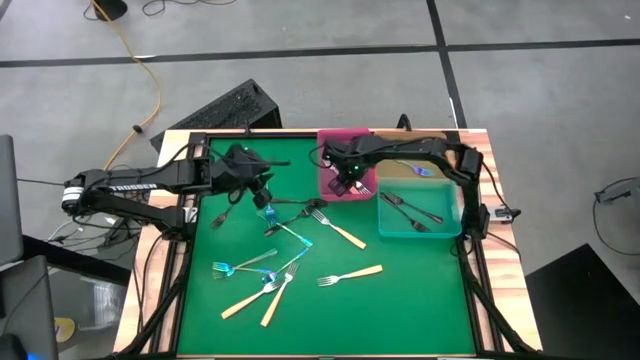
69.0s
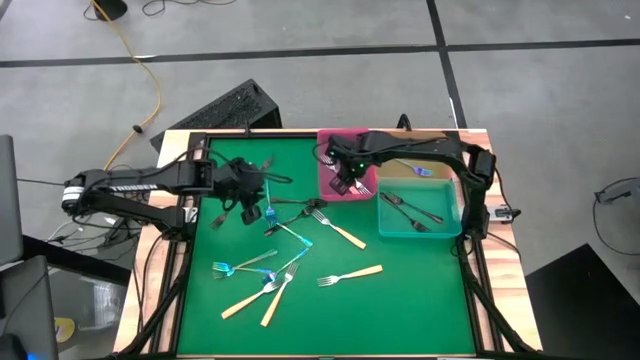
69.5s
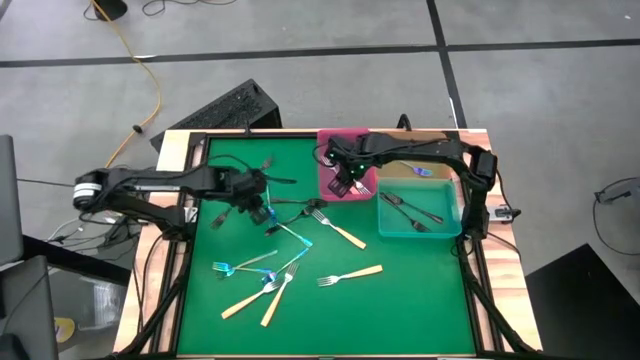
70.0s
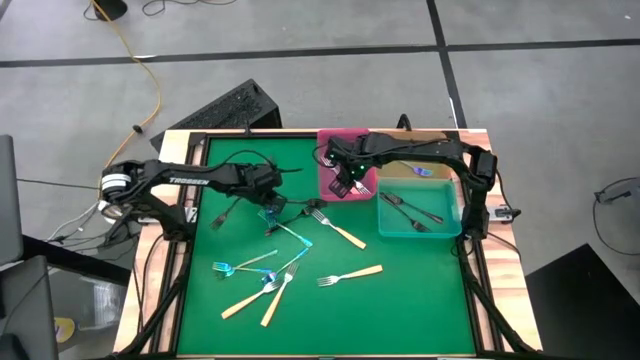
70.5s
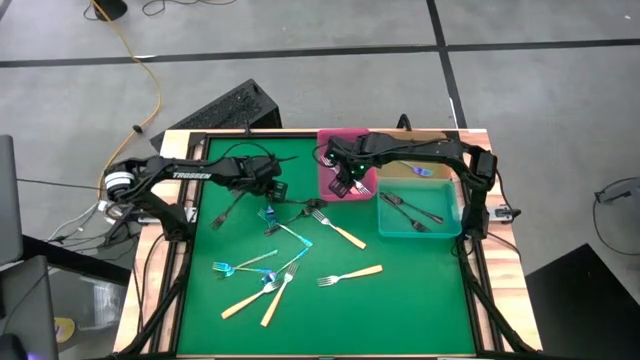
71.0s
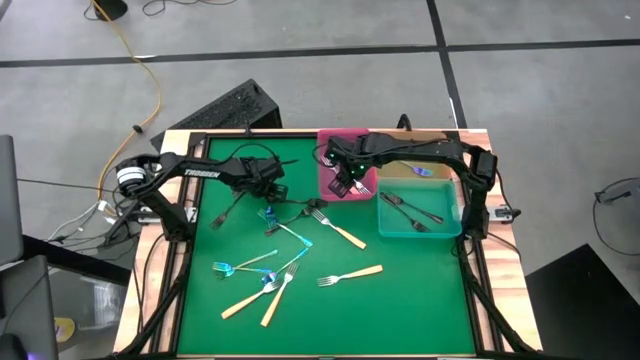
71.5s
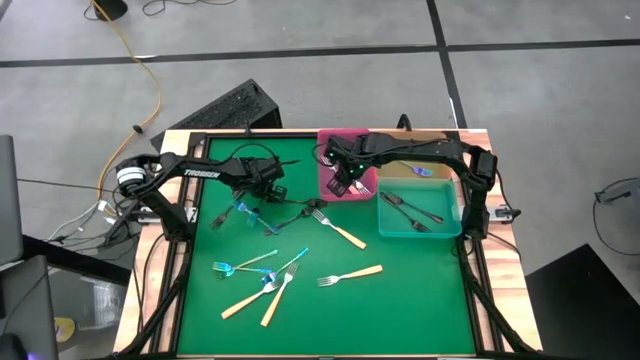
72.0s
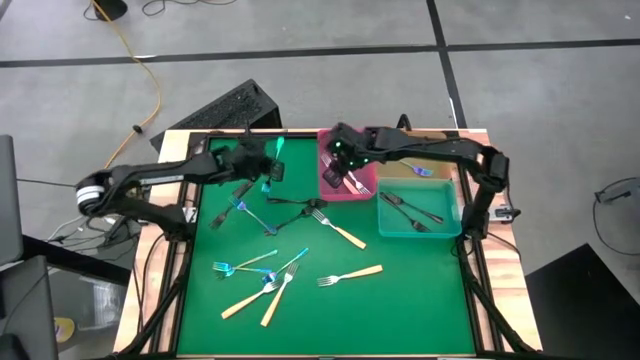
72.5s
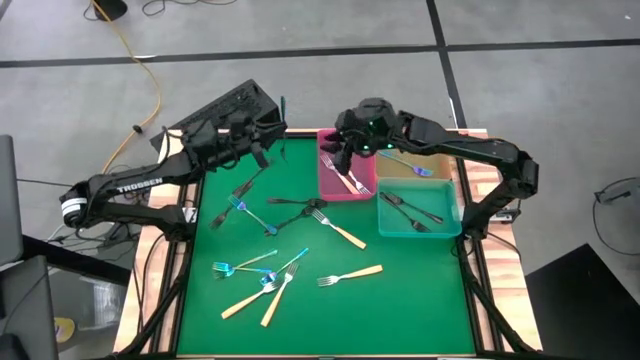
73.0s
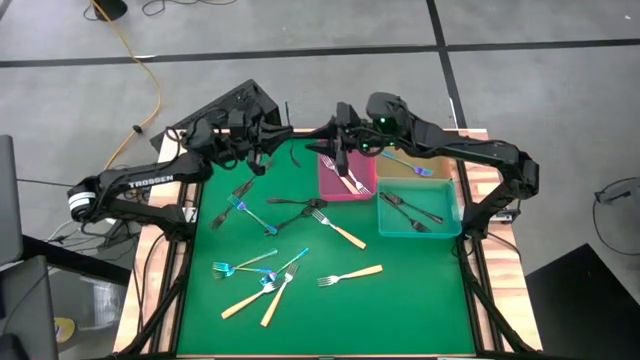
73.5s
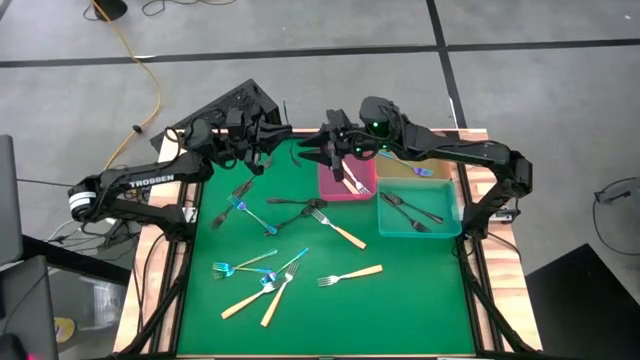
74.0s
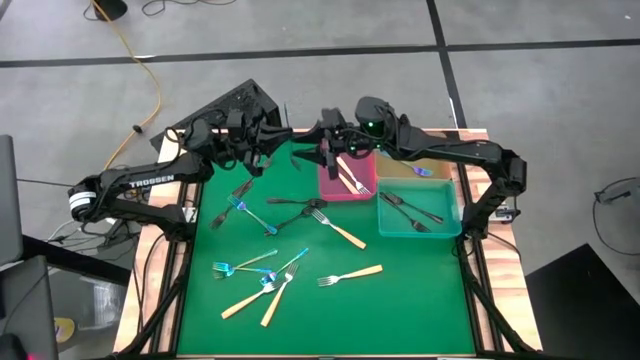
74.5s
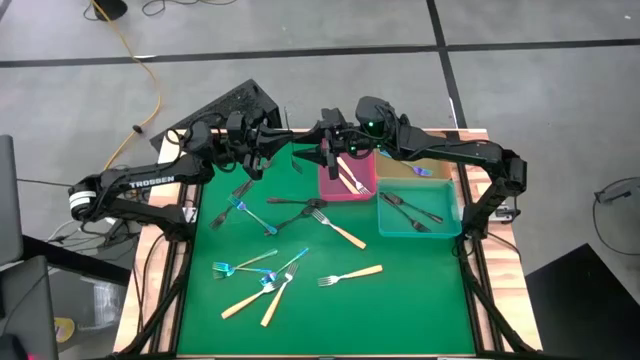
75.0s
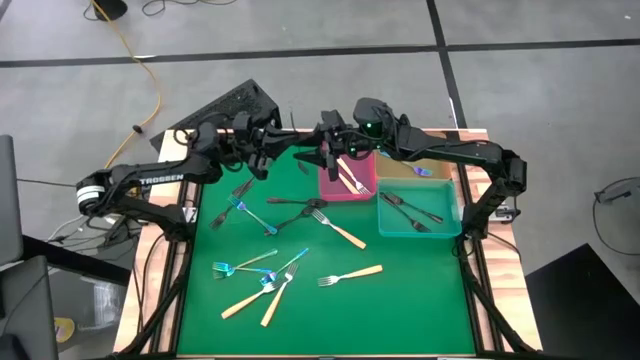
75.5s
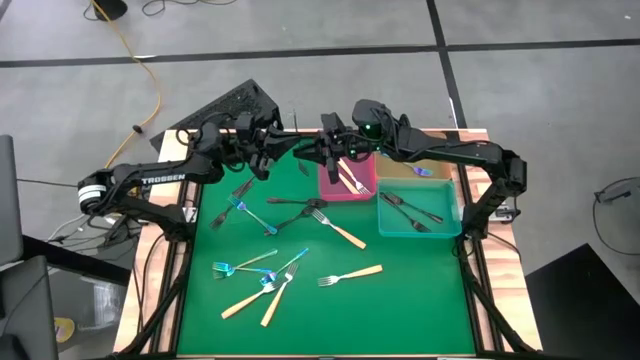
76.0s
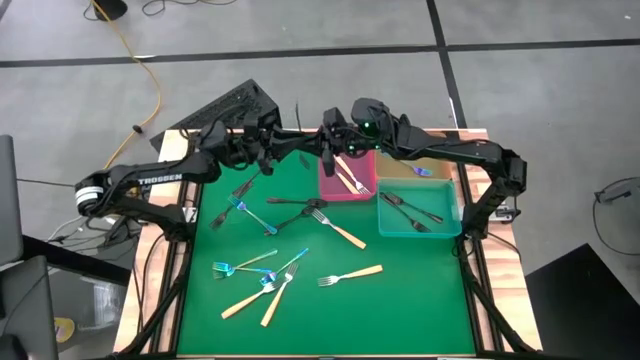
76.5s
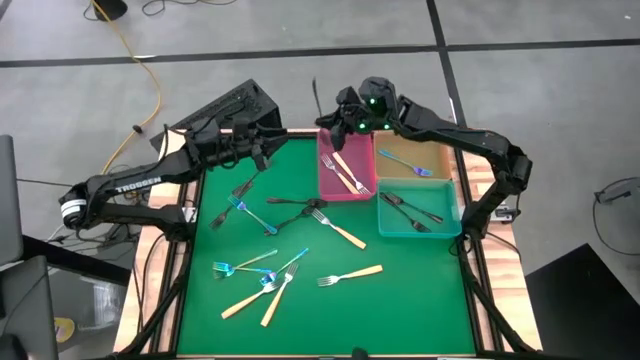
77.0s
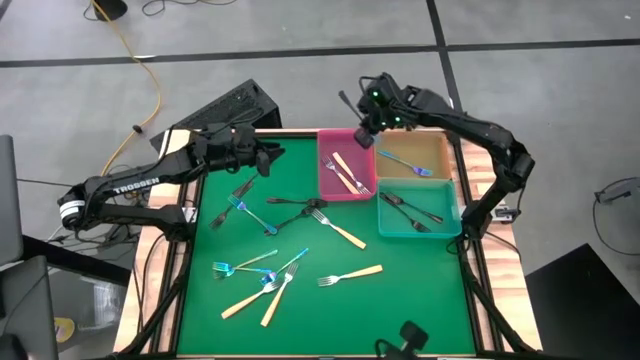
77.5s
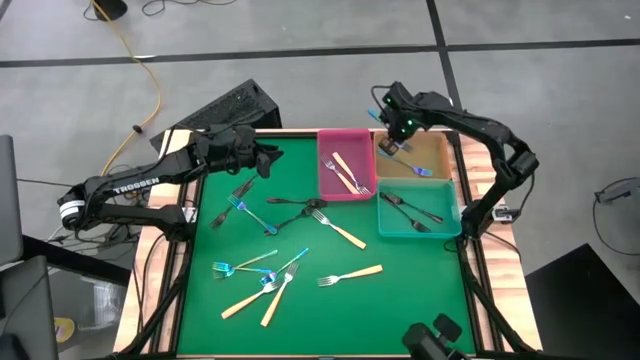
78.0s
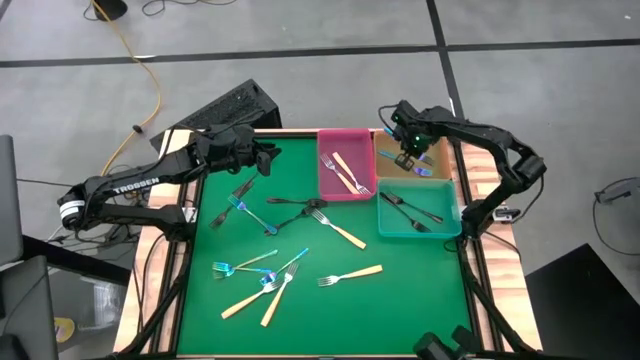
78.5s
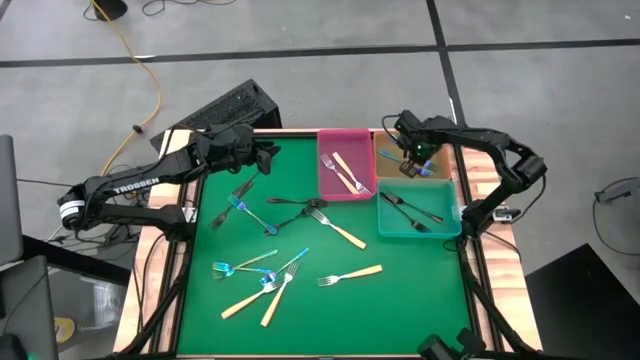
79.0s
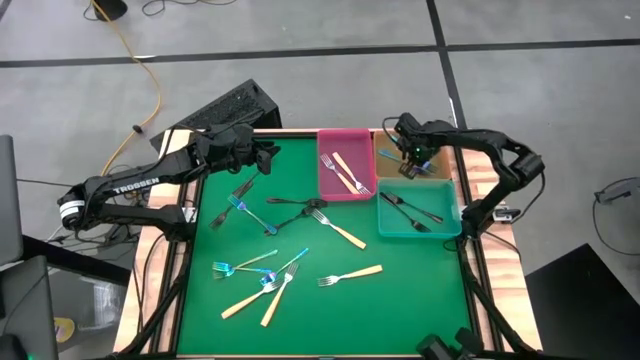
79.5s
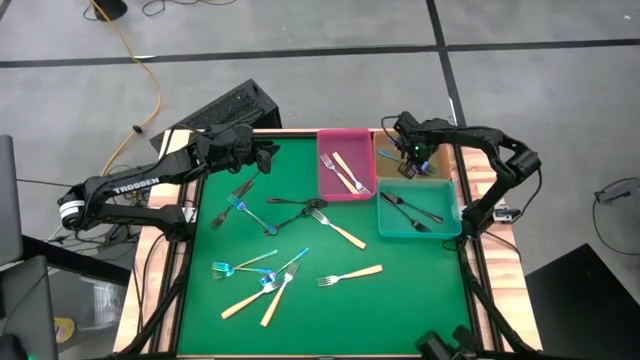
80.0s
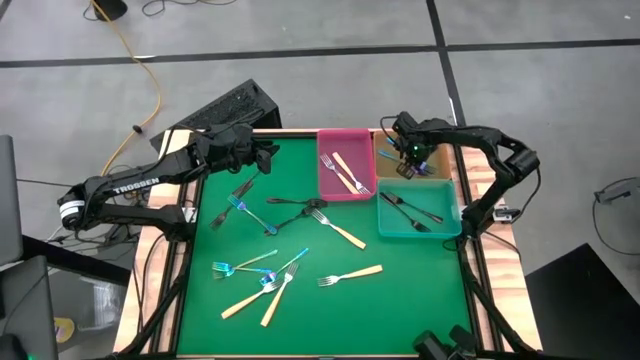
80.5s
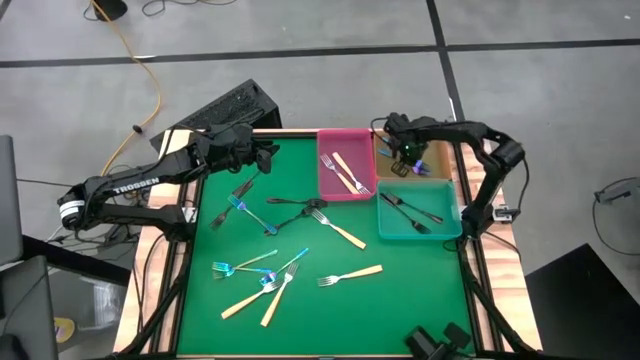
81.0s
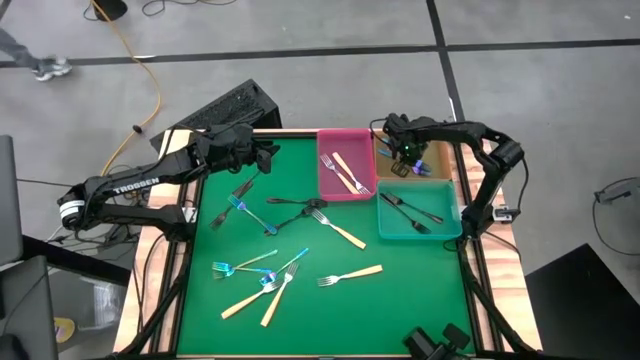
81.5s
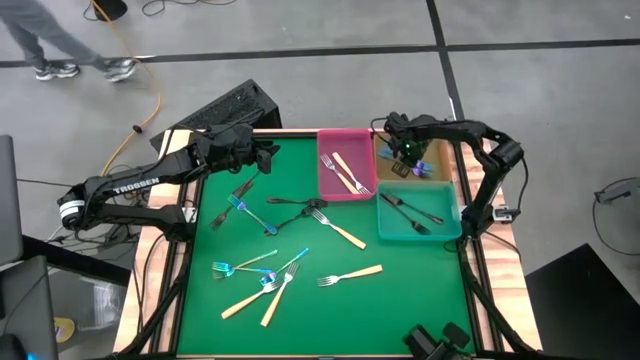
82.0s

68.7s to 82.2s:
Task: Sort silverware by color (type)
Put the blue fork into the orange bin

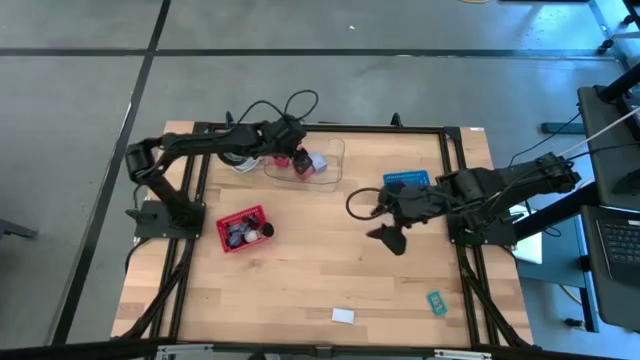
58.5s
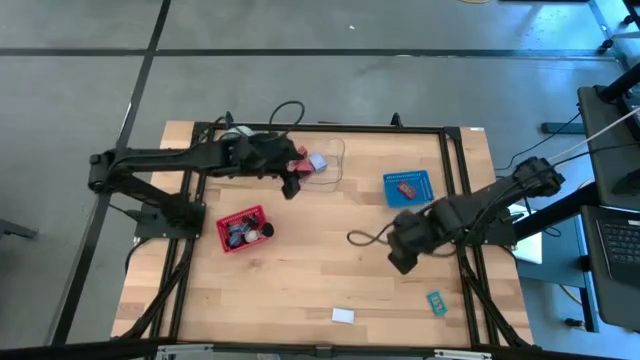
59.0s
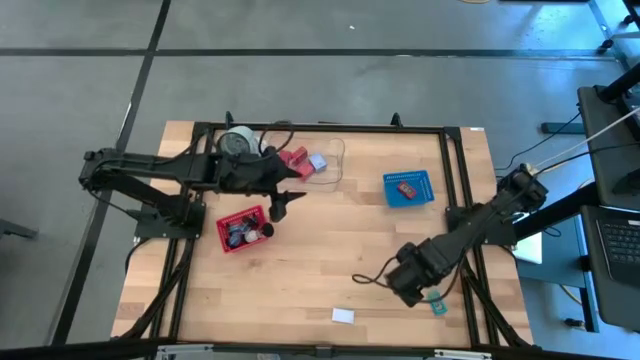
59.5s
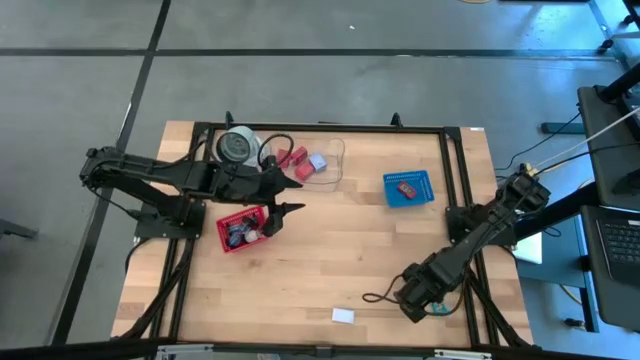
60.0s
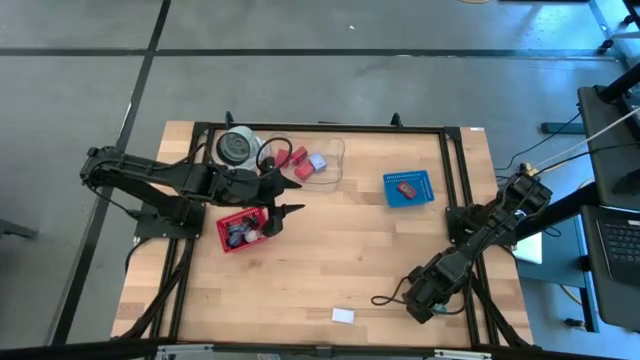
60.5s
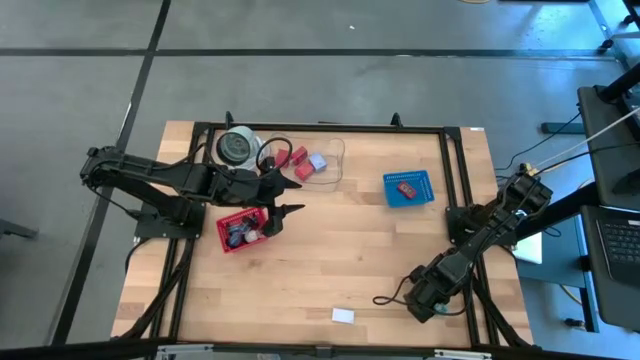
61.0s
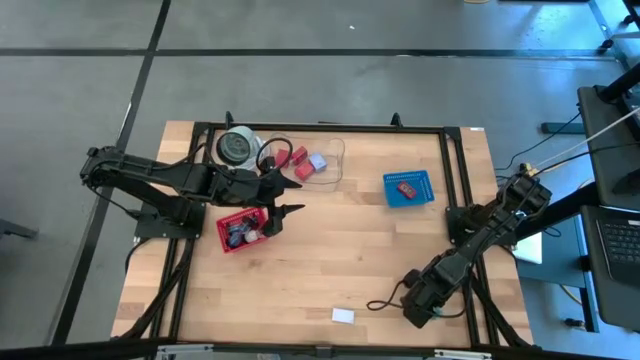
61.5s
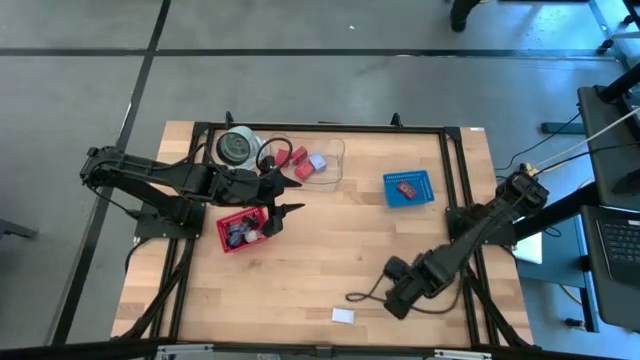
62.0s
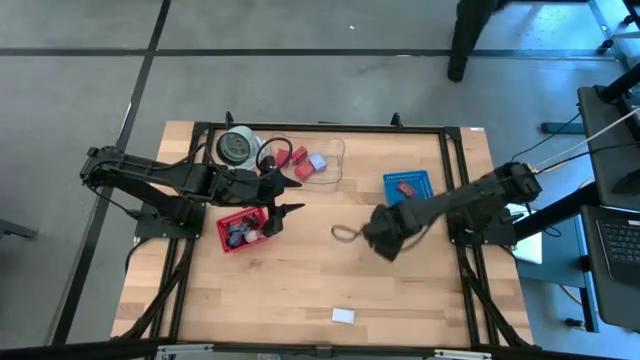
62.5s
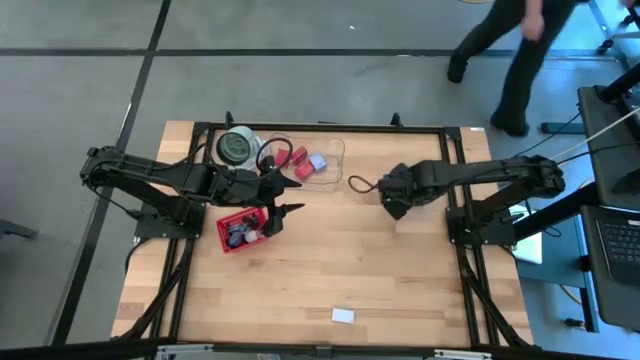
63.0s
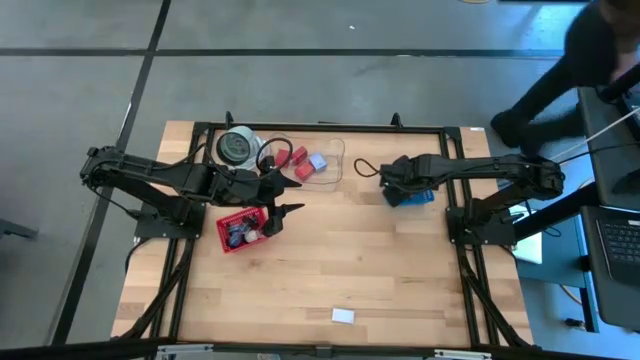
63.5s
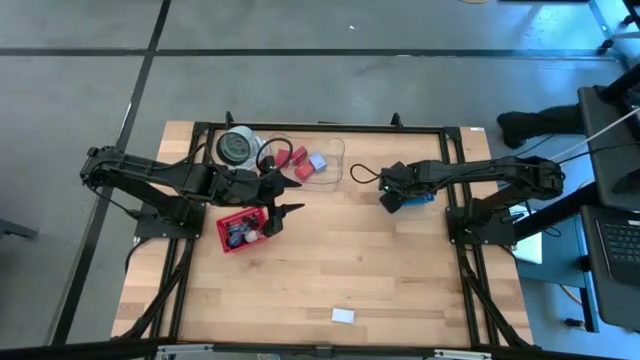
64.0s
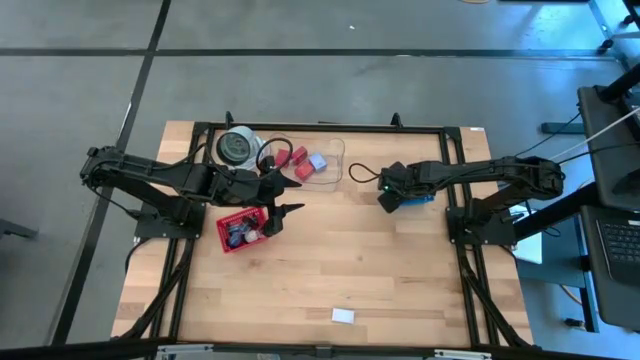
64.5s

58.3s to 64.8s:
Task: Pick & Place Office items
Put the blue digital timer into the blue bin
